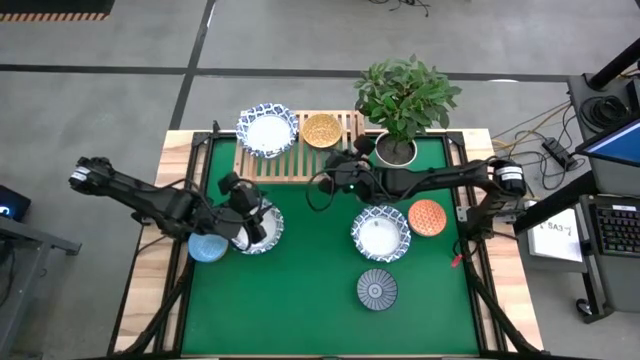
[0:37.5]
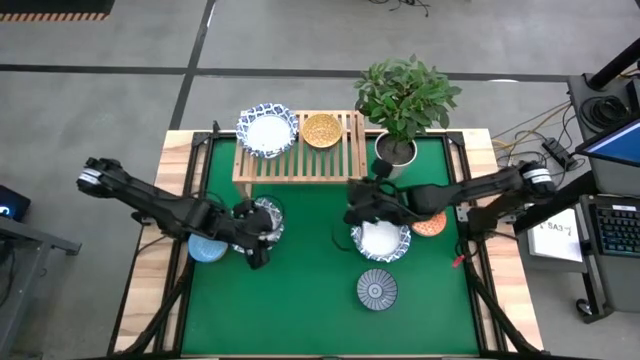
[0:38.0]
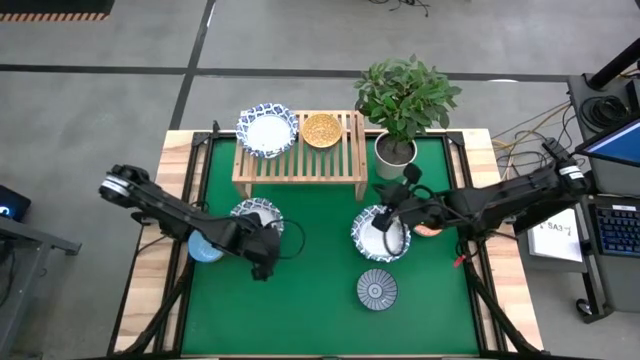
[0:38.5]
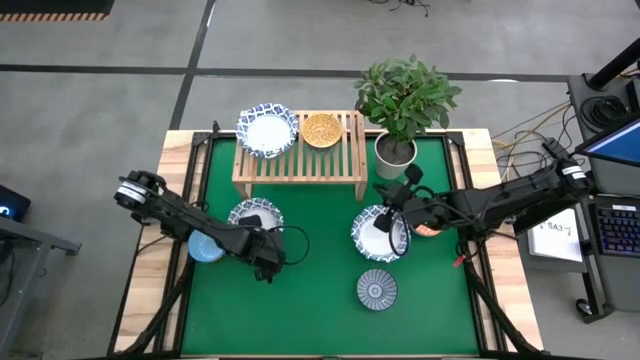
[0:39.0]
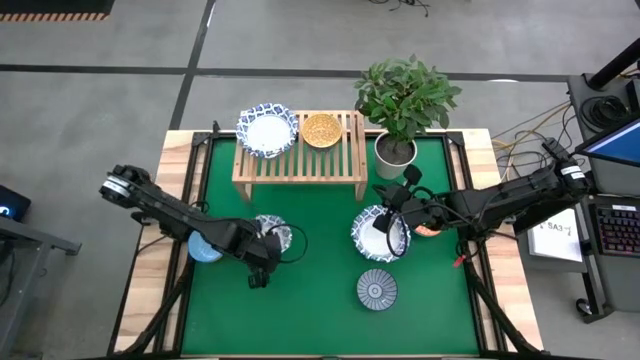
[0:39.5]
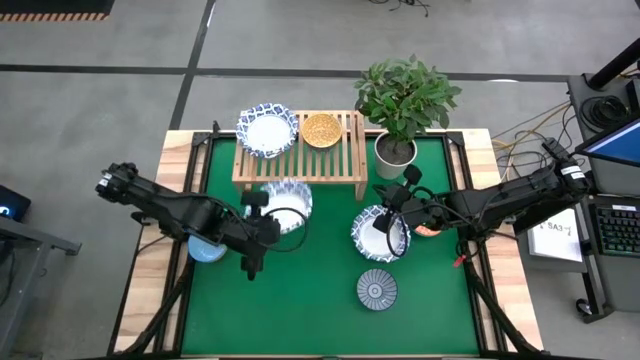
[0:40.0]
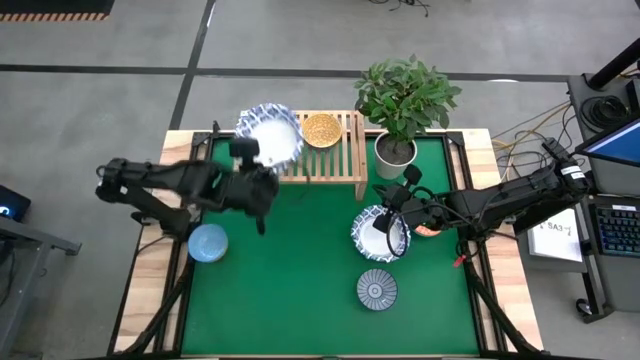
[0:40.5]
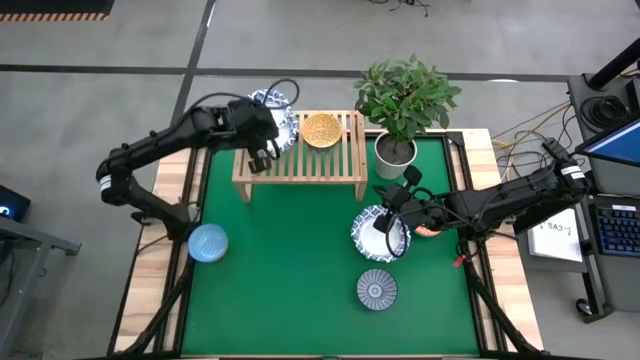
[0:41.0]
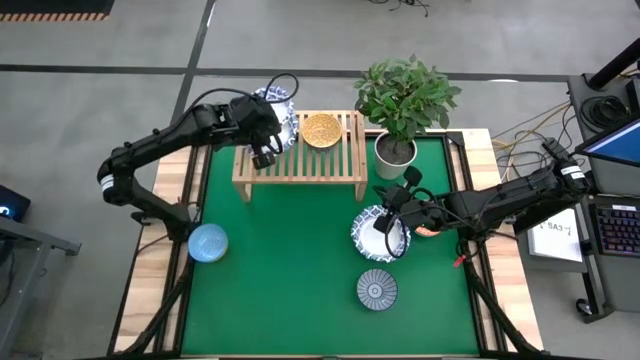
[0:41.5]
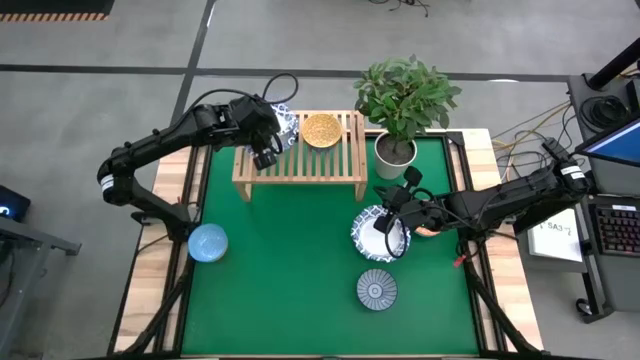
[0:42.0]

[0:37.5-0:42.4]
Task: Place and stack bowls onto a shelf
Stack the white bowl on top of the other white bowl on the shelf

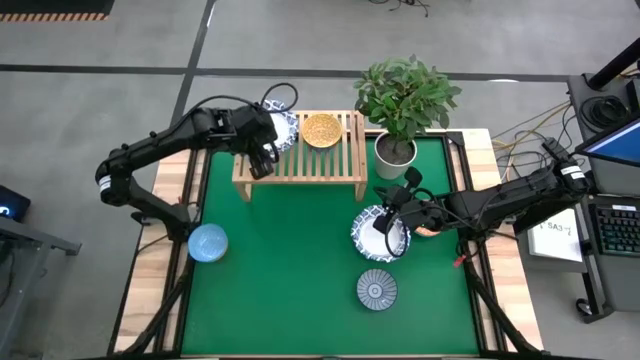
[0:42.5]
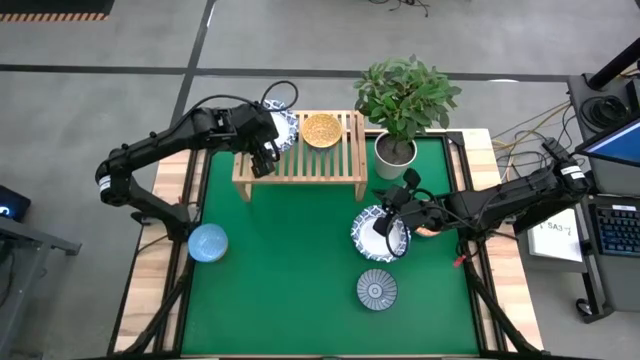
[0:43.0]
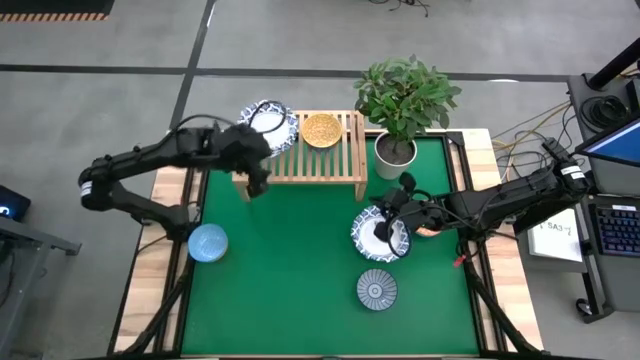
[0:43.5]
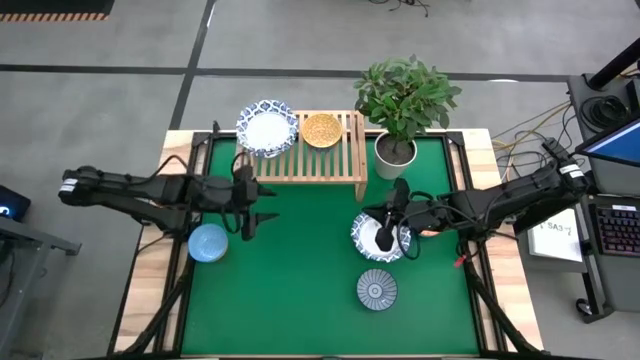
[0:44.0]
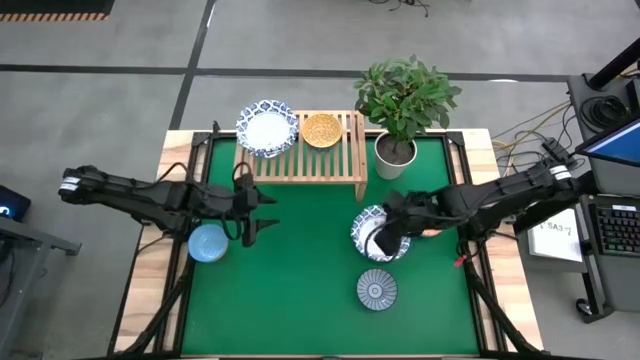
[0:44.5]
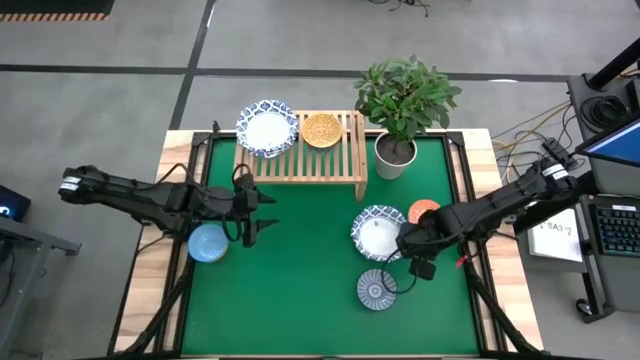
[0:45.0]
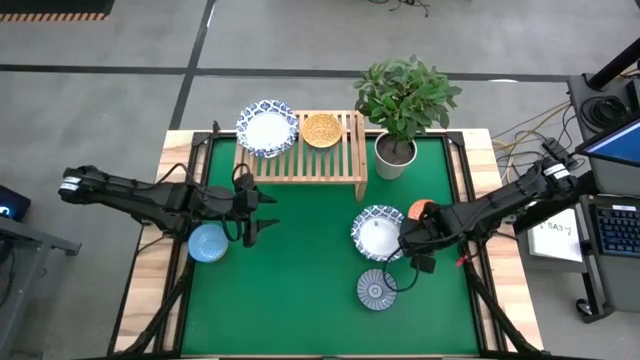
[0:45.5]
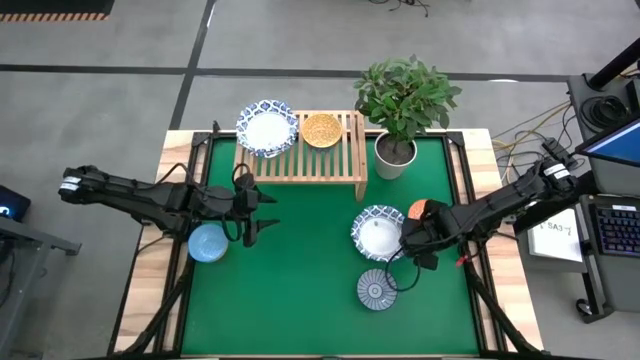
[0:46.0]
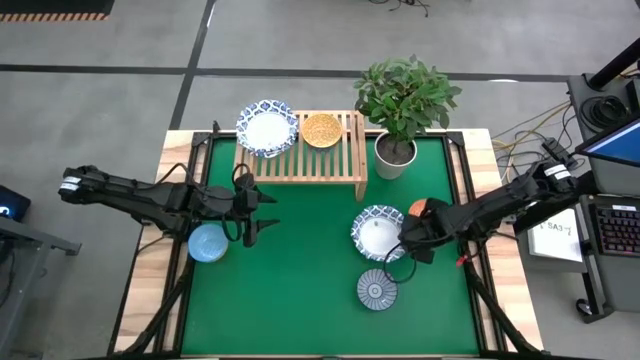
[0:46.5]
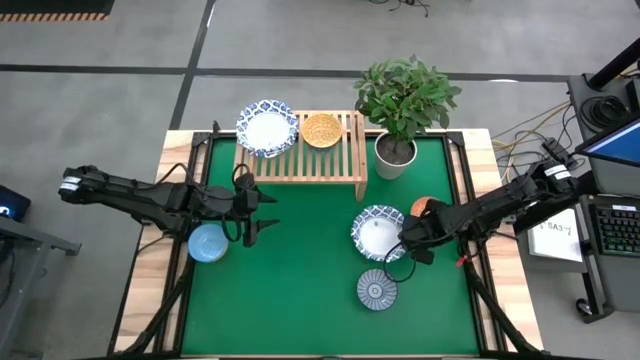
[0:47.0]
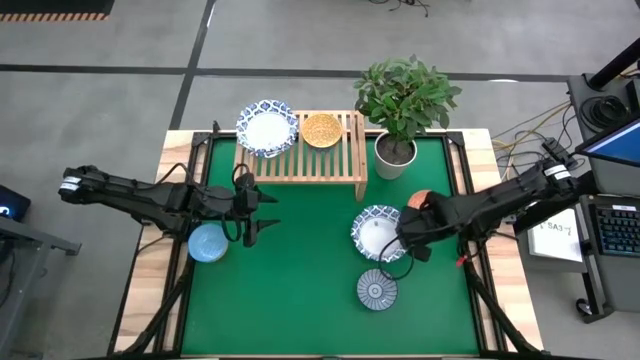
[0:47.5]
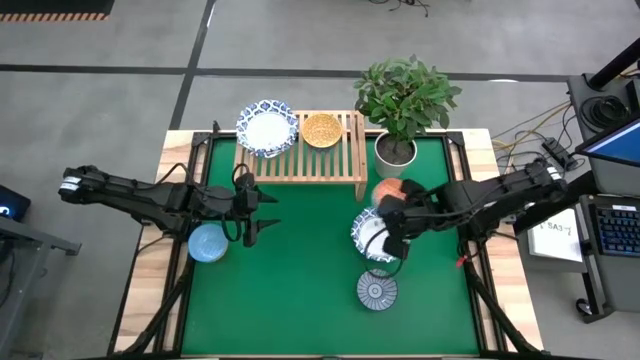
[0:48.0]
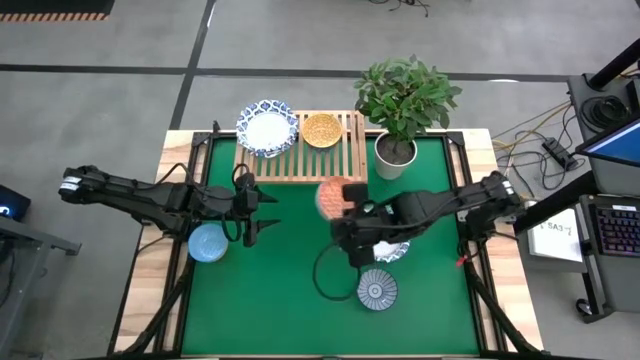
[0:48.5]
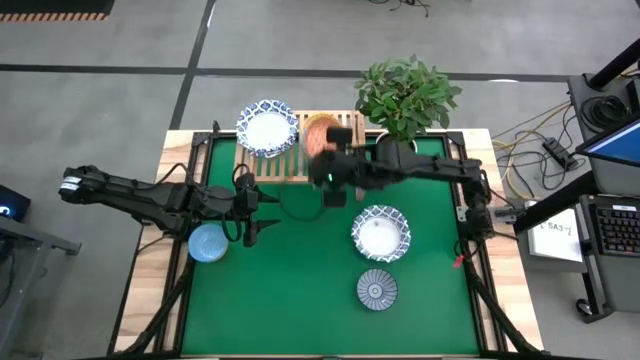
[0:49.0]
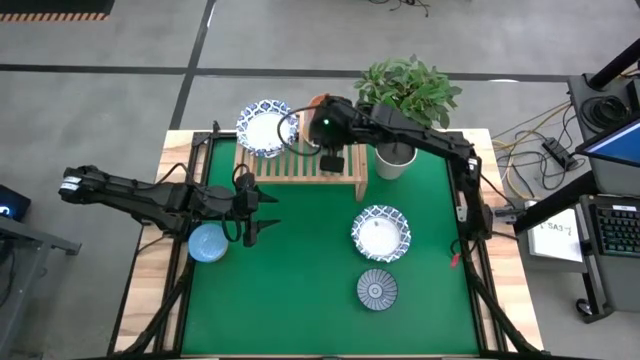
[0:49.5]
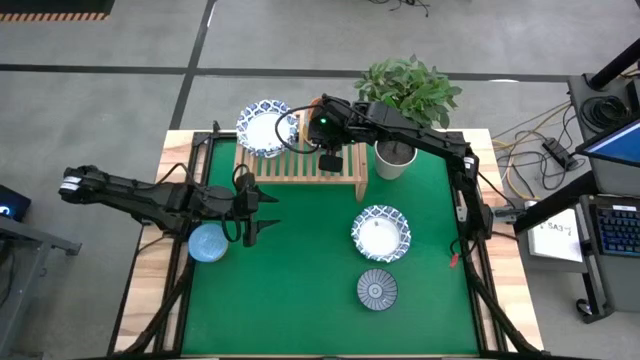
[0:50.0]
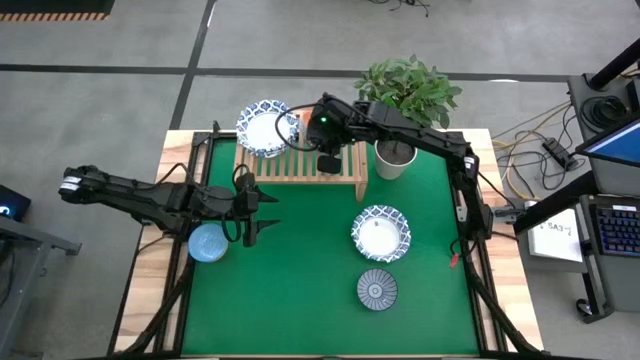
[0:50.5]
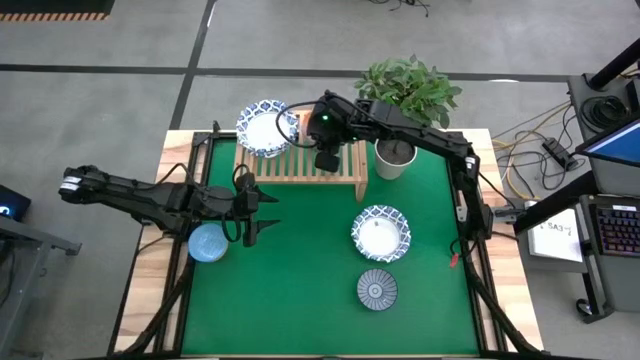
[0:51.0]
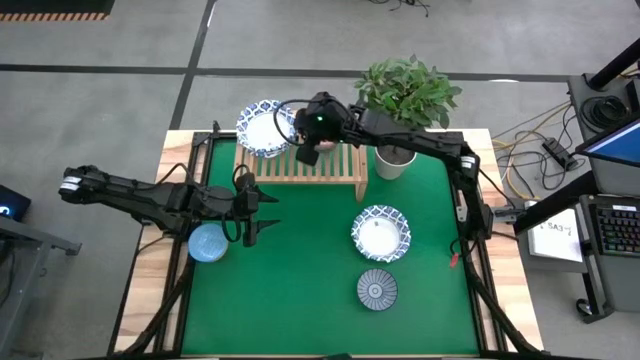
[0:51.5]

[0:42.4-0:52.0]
Stack the orange bowl on top of the yellow bowl on the shelf

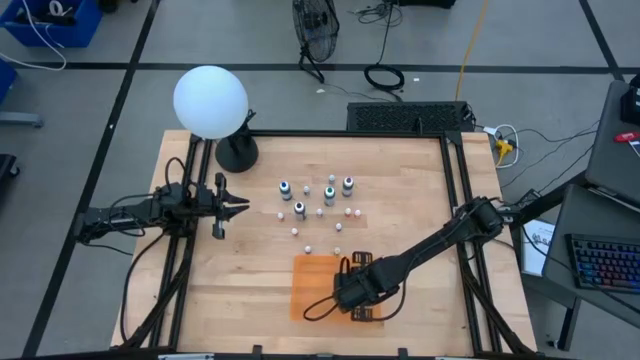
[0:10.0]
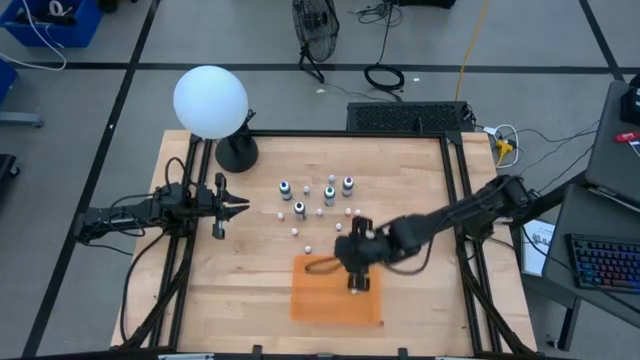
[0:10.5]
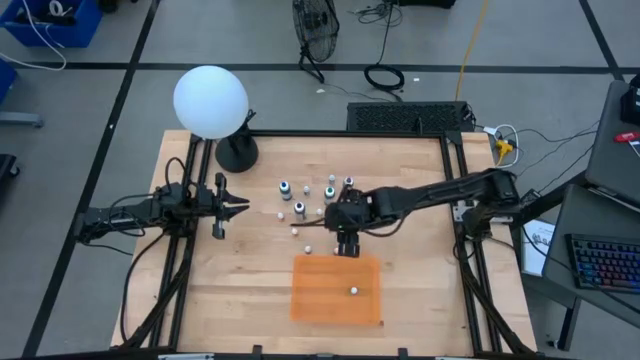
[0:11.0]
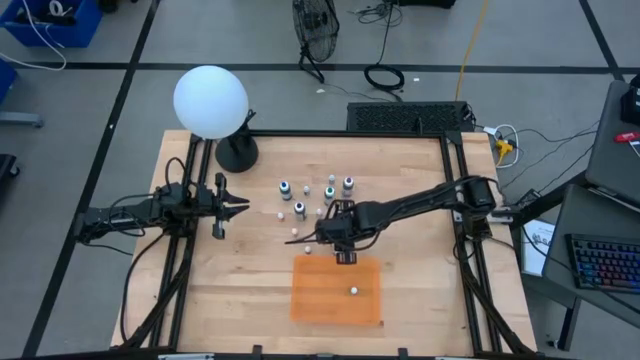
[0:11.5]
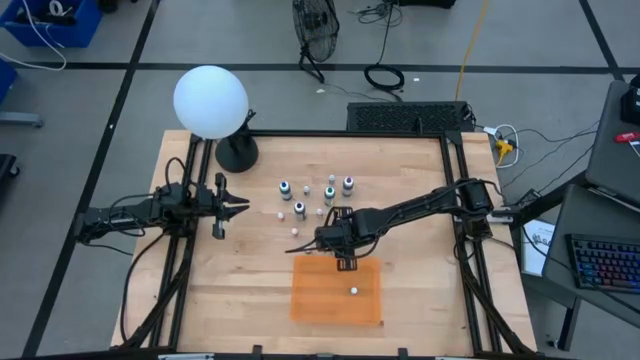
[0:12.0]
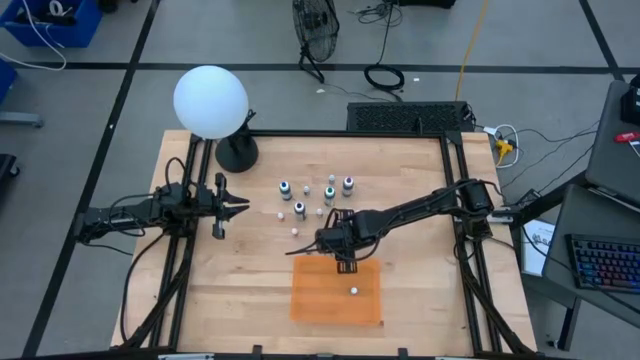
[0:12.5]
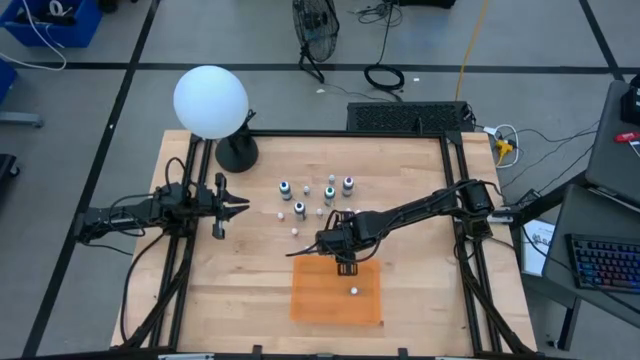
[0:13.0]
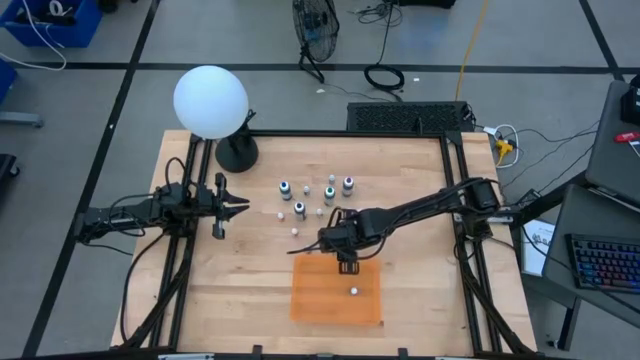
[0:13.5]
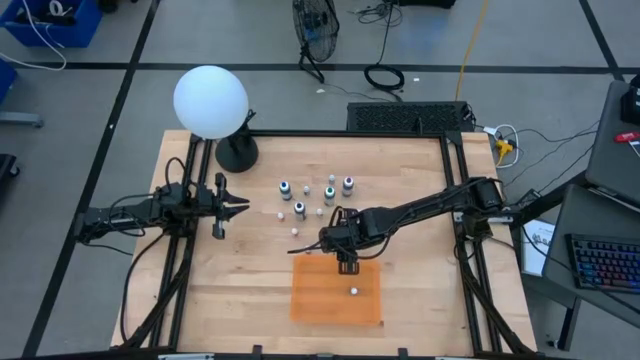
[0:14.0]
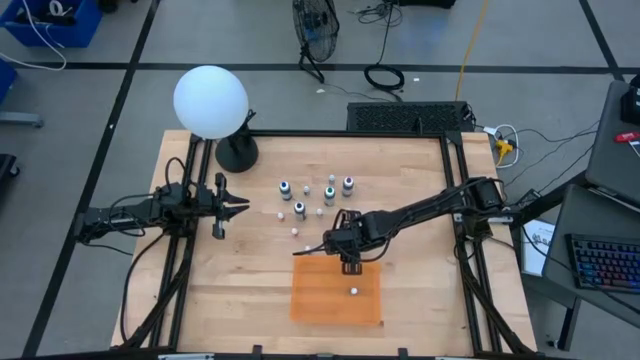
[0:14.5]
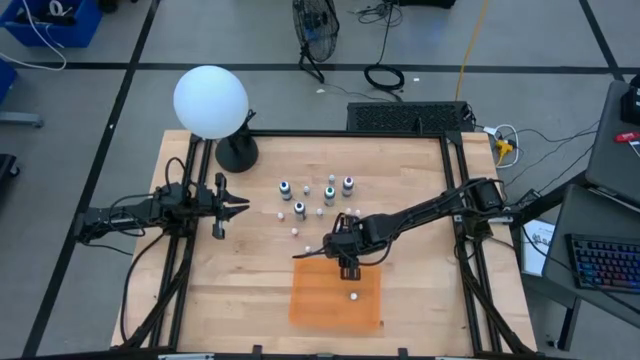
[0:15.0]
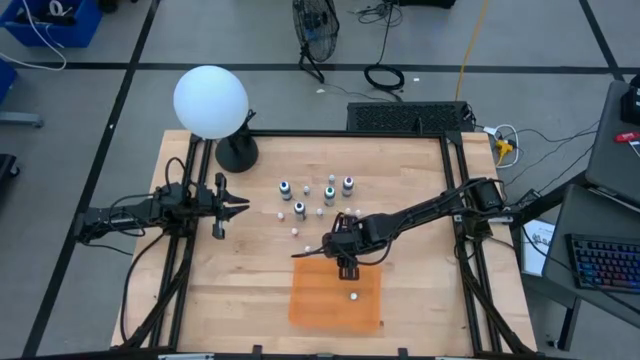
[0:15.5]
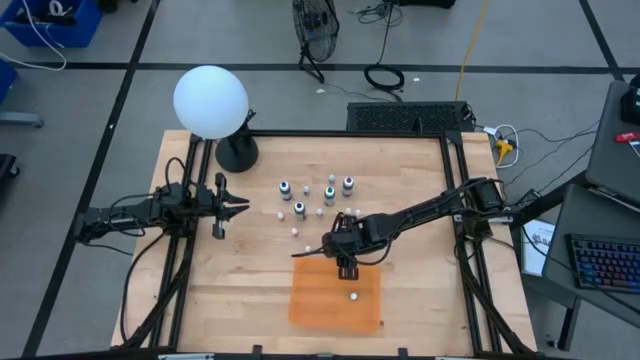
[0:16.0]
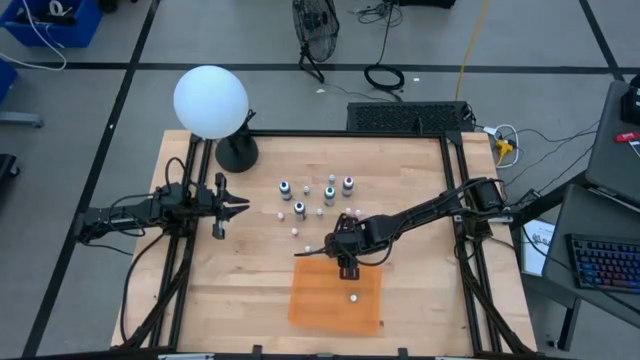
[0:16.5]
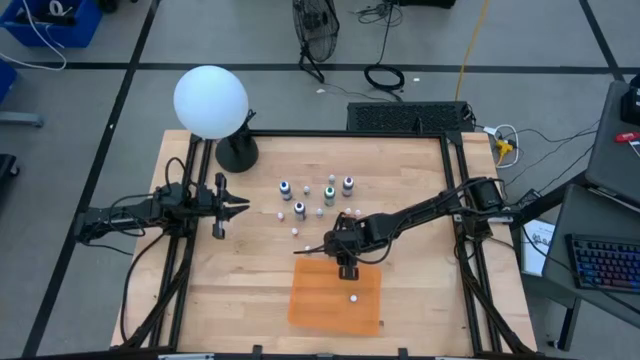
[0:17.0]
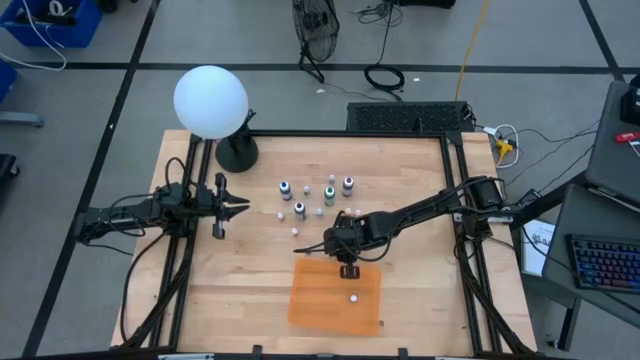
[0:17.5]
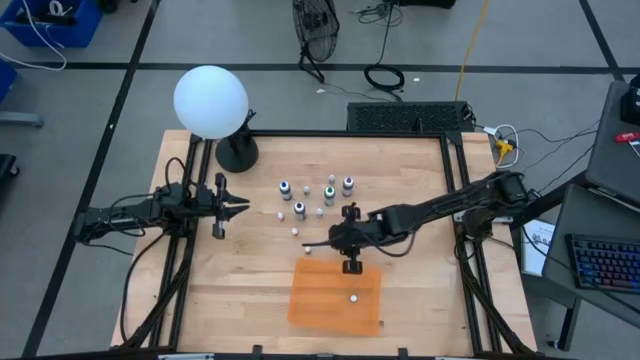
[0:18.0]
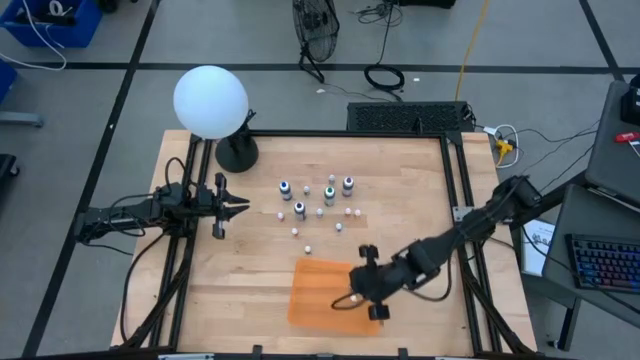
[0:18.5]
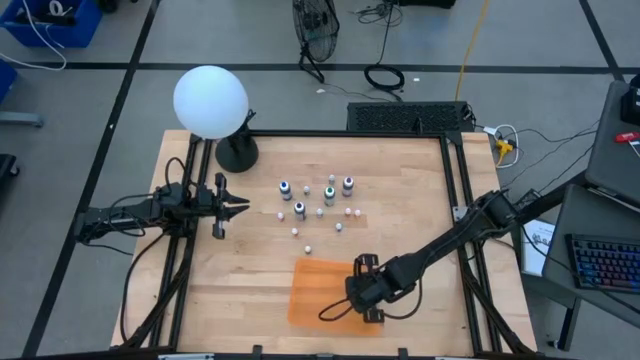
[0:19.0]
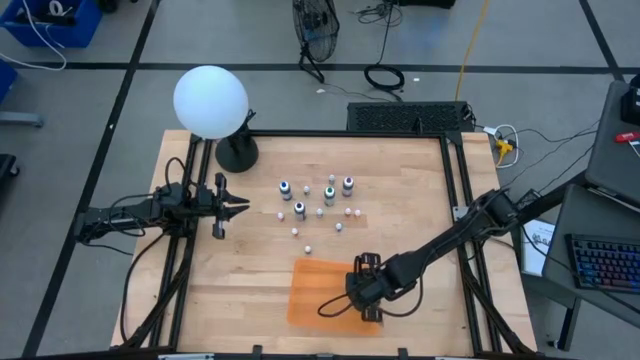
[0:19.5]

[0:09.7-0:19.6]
Task: Pick & Place food coloring
Put the small purple food coloring bottle into the orange container
